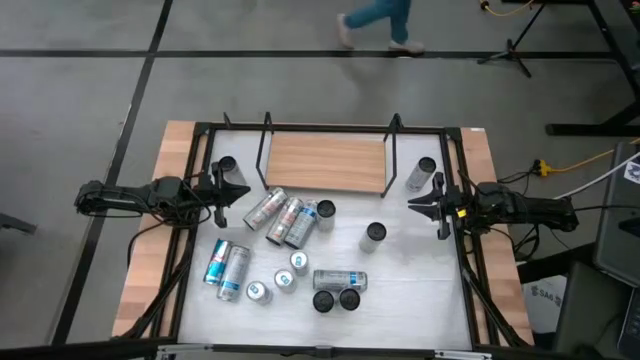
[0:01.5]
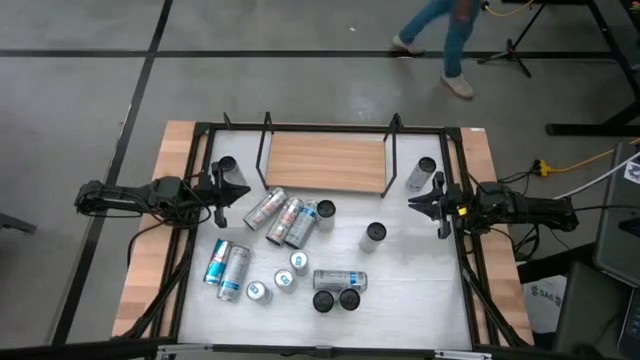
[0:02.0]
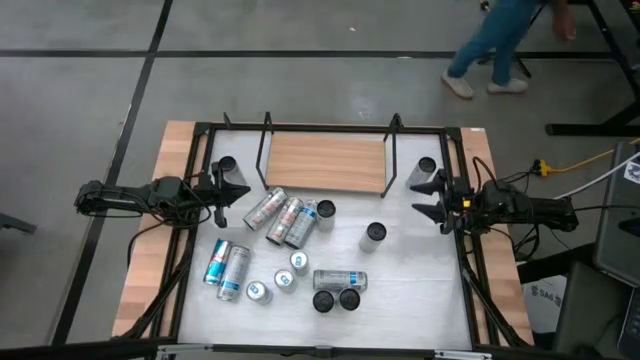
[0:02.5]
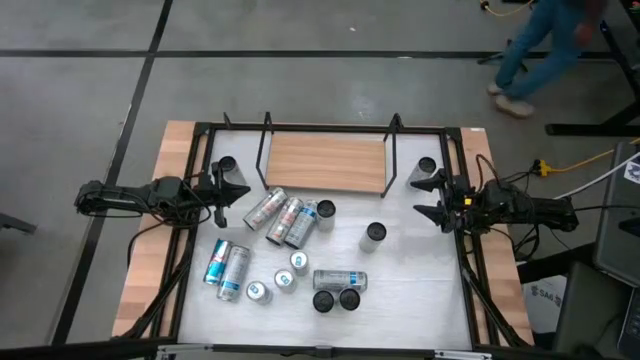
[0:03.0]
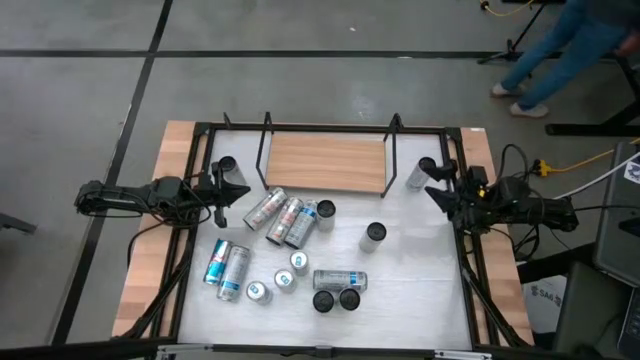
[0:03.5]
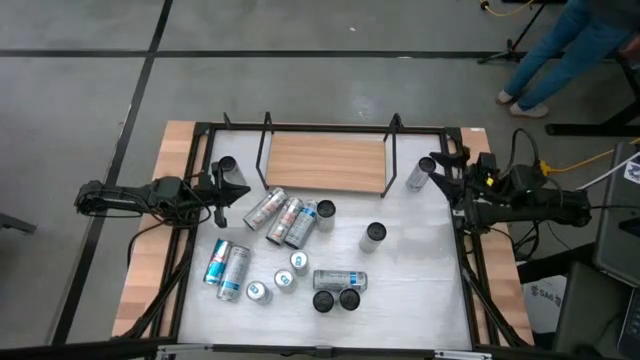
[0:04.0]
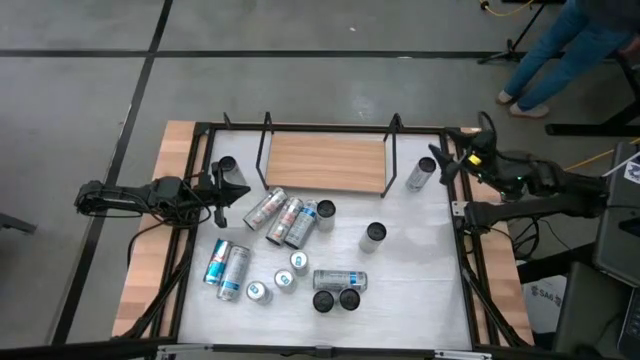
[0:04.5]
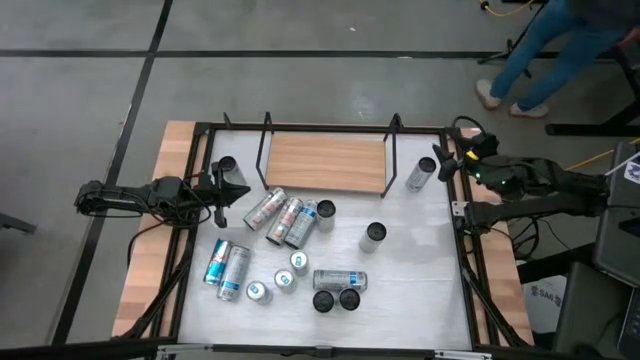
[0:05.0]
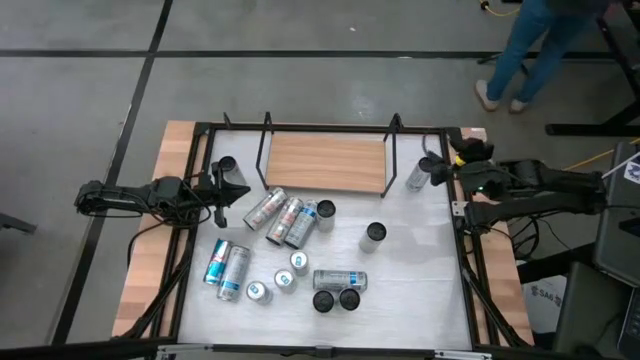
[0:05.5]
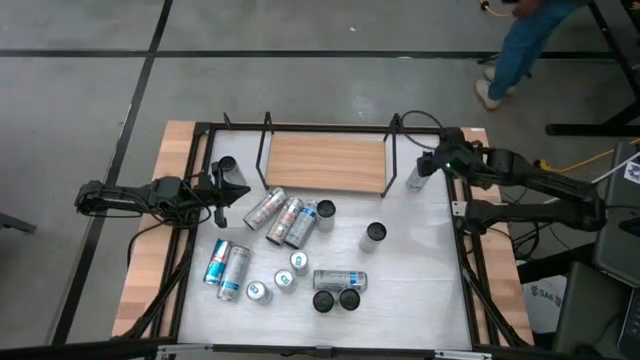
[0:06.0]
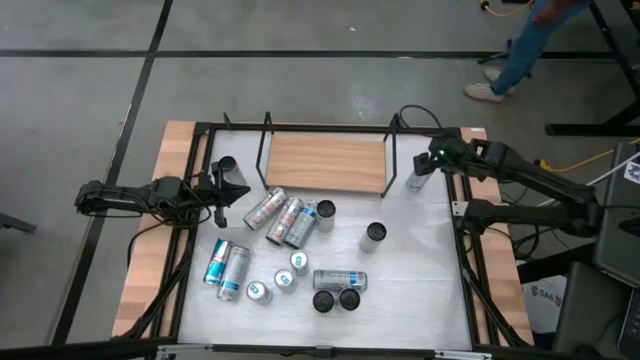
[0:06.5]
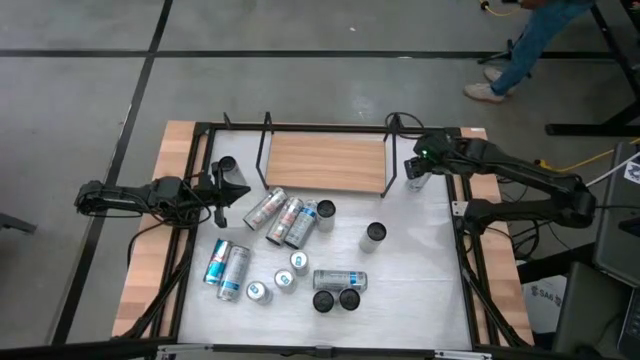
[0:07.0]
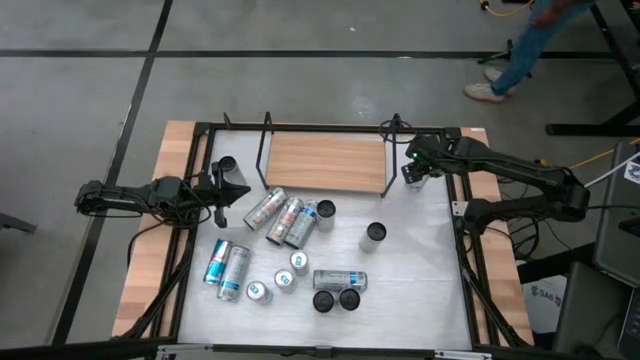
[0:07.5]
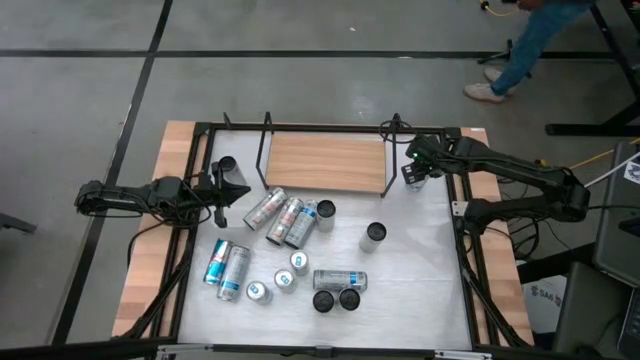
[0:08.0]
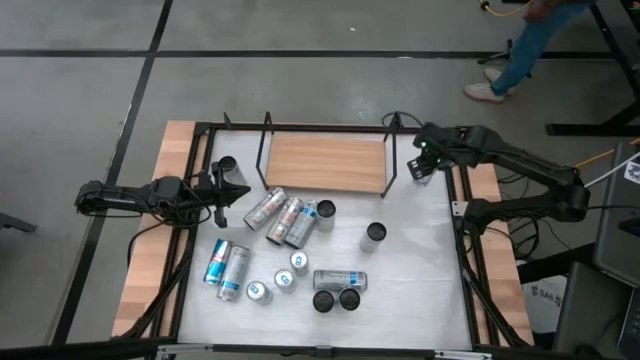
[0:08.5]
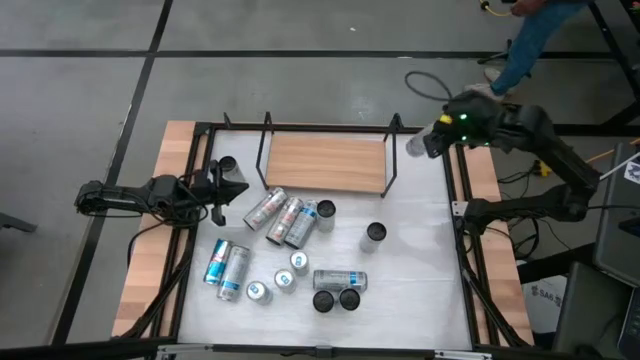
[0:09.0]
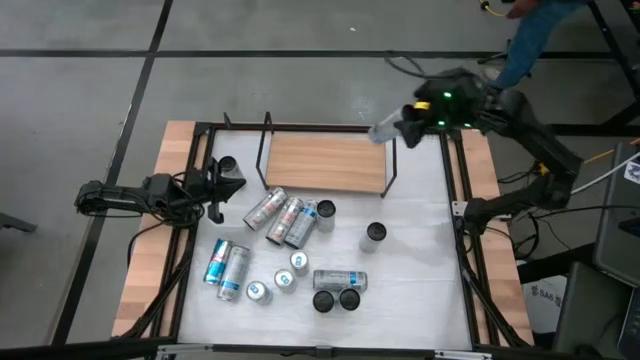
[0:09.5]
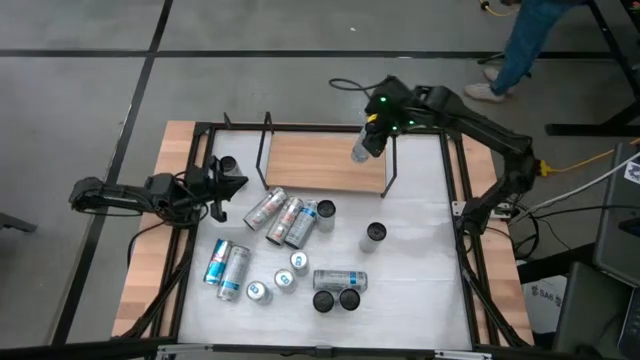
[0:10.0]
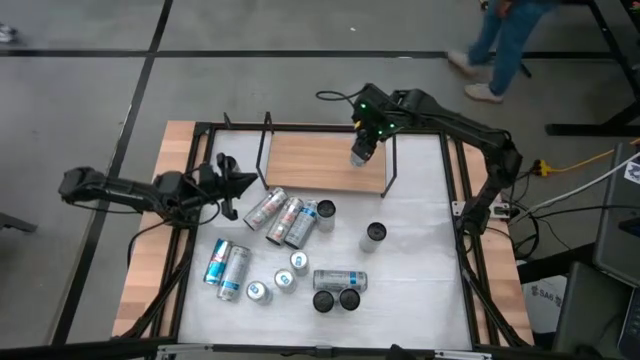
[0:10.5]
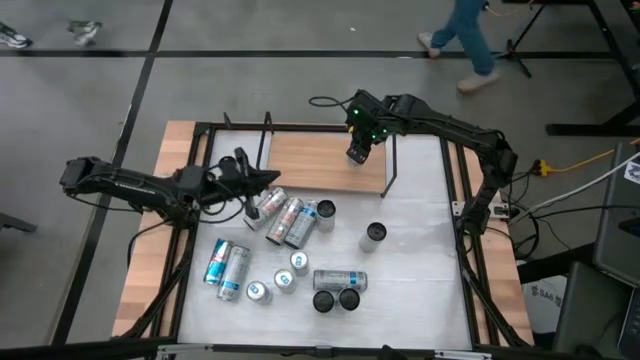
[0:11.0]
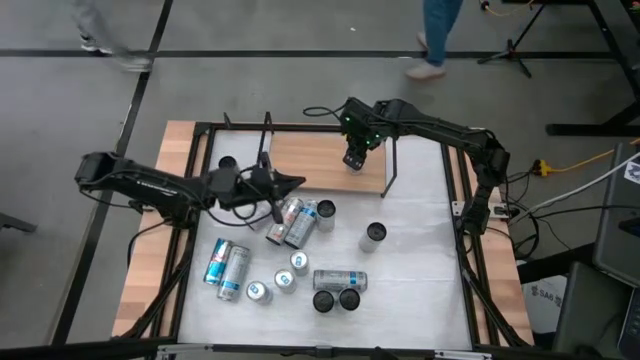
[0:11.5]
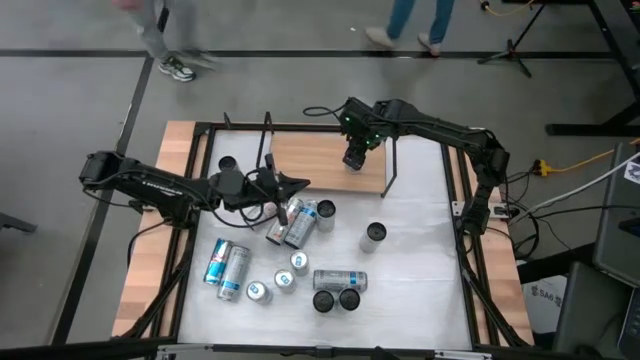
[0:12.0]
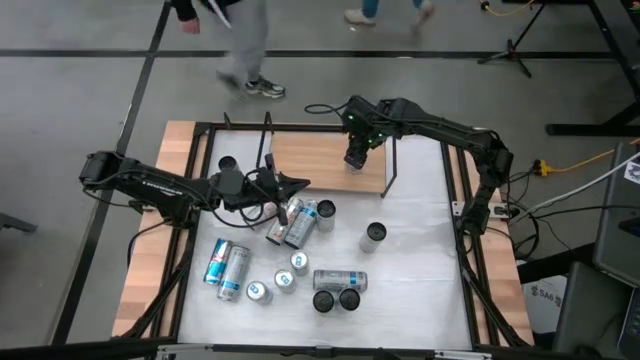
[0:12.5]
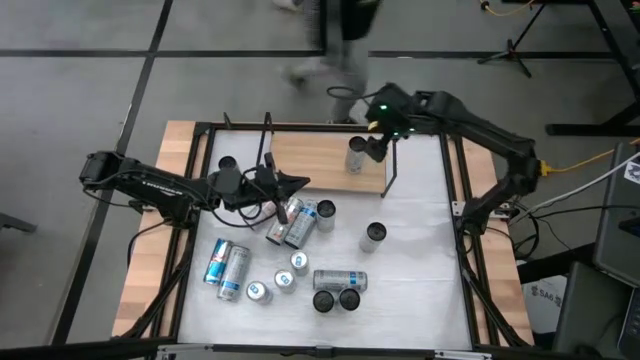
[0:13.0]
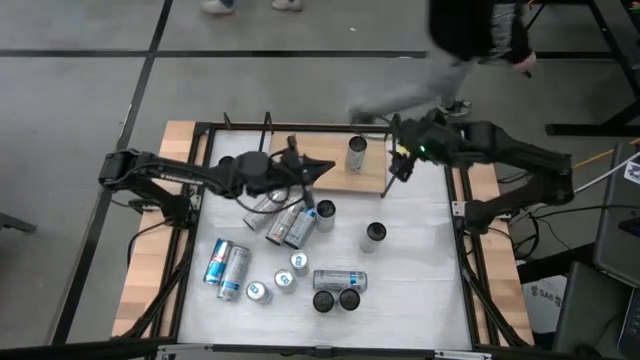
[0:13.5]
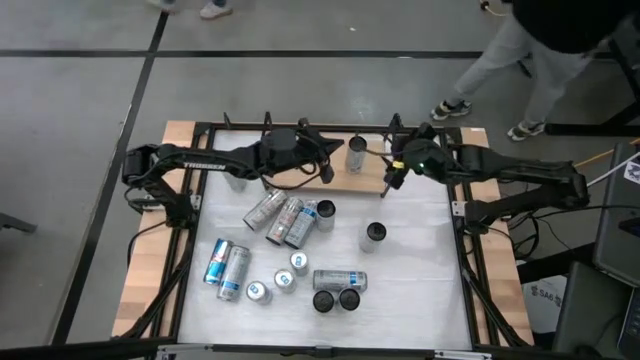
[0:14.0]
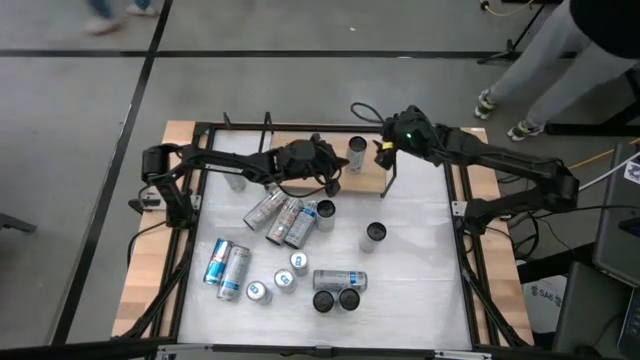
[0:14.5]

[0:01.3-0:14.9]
Task: Place canned beverage on shelf
Put the white soda can on the shelf
